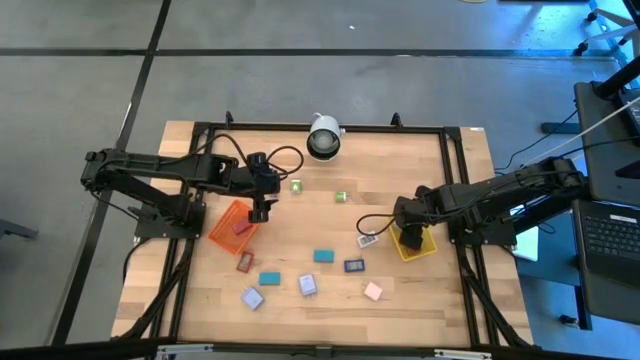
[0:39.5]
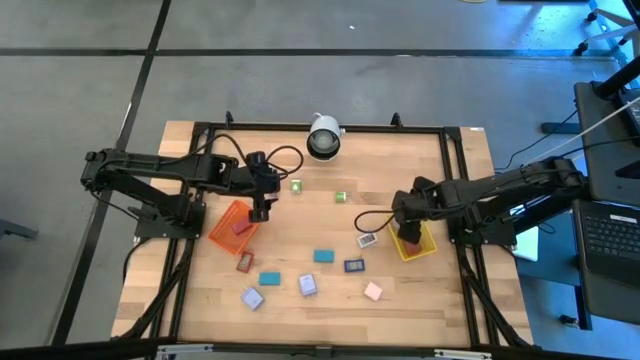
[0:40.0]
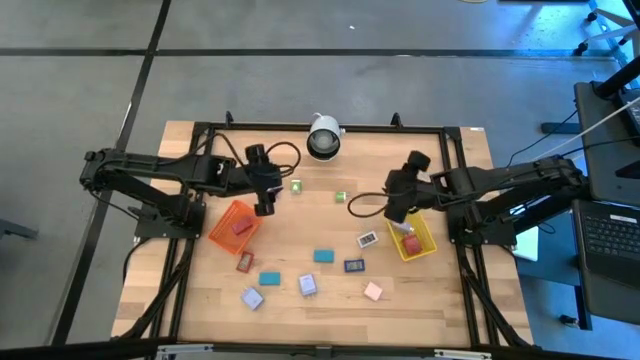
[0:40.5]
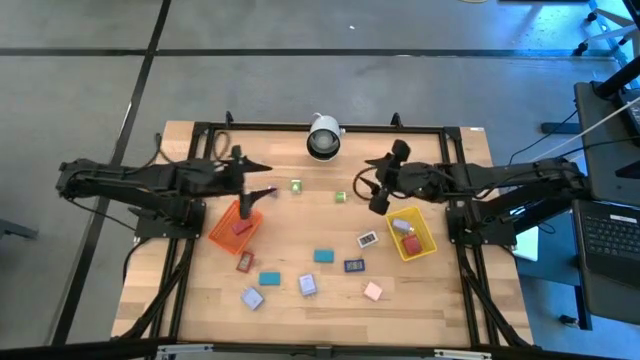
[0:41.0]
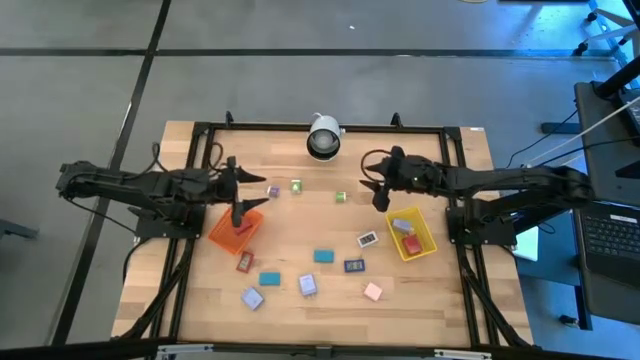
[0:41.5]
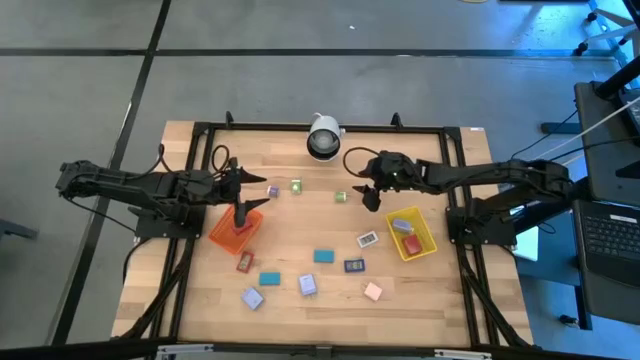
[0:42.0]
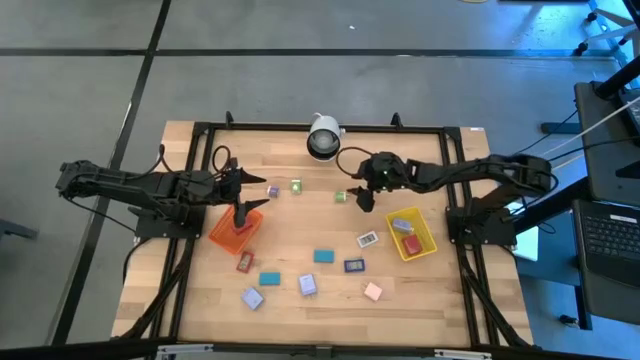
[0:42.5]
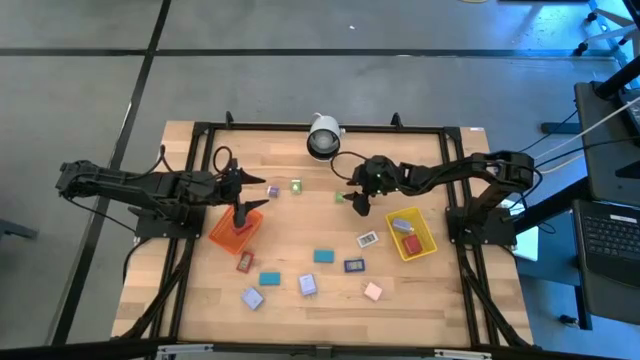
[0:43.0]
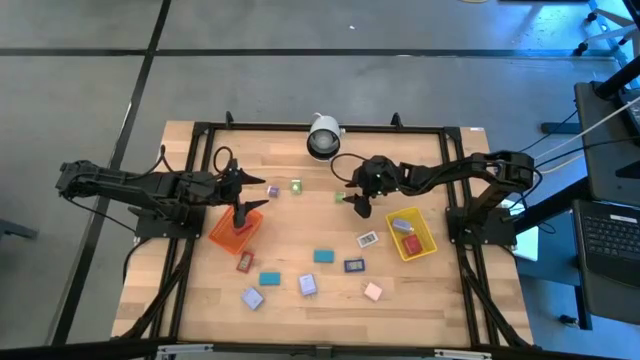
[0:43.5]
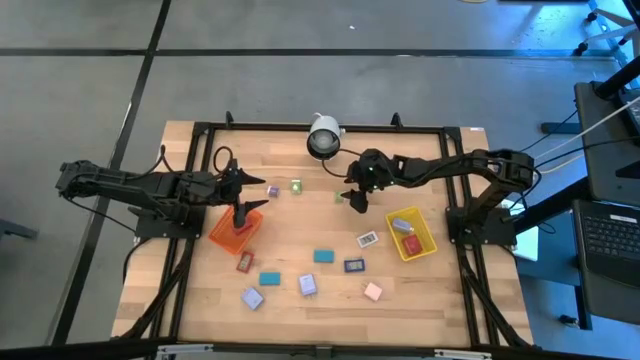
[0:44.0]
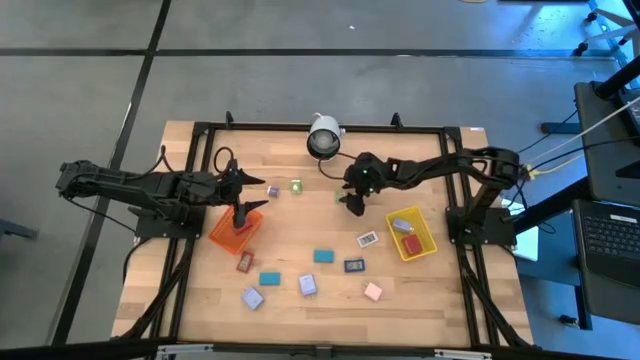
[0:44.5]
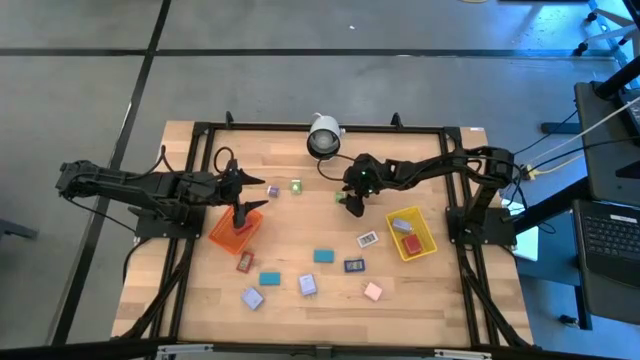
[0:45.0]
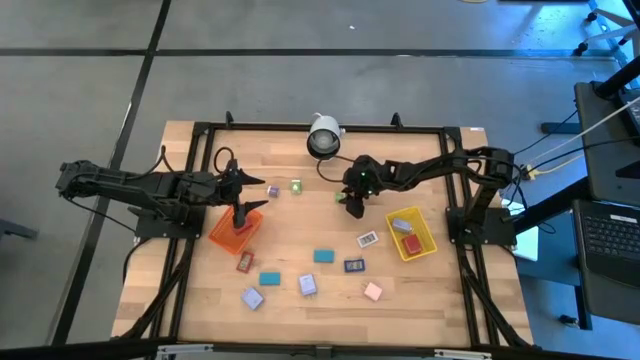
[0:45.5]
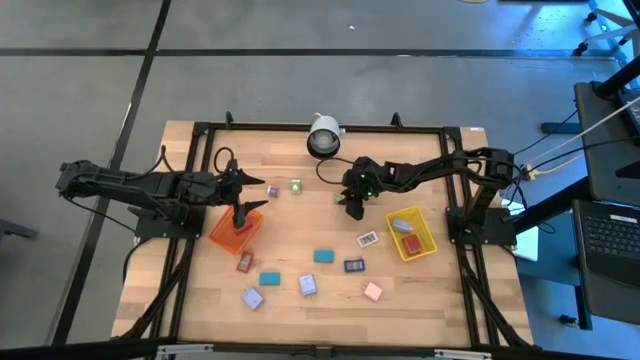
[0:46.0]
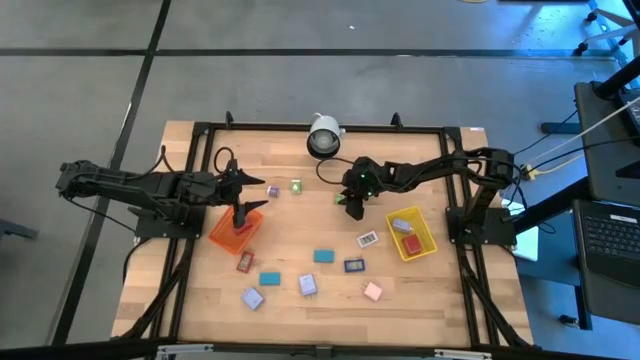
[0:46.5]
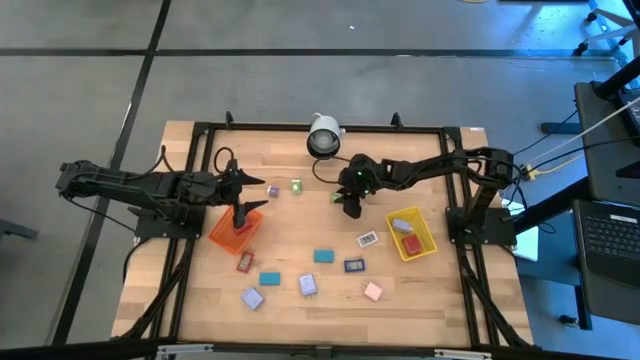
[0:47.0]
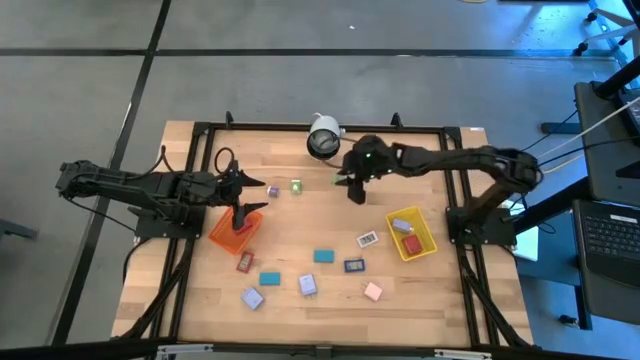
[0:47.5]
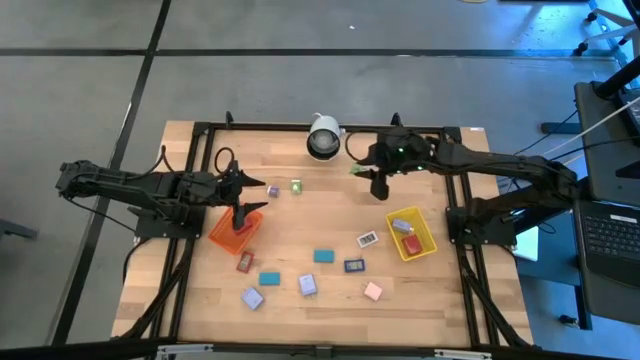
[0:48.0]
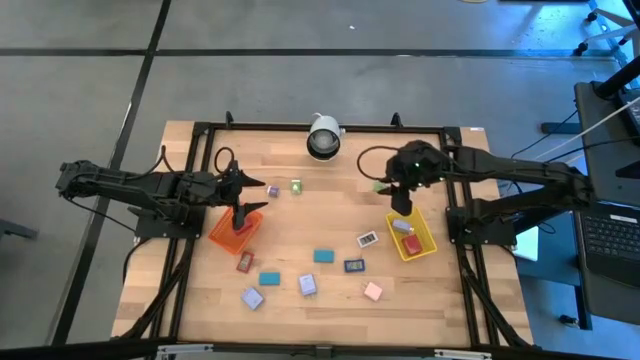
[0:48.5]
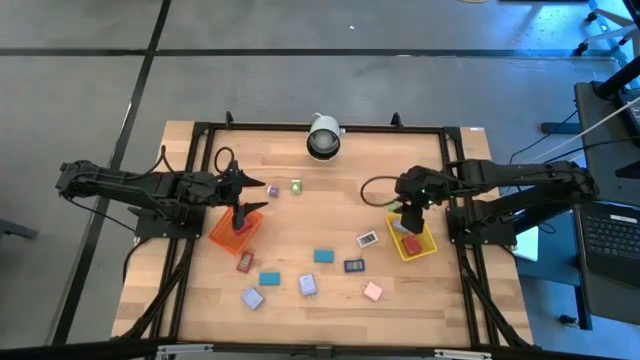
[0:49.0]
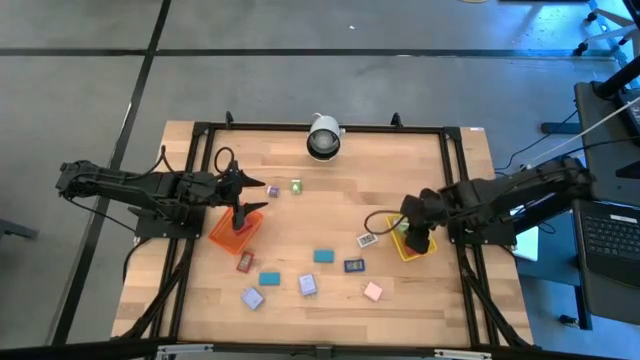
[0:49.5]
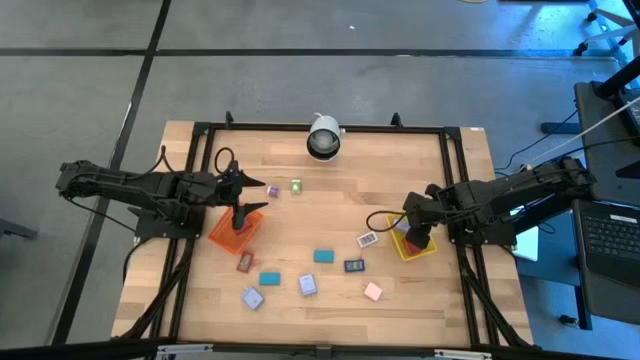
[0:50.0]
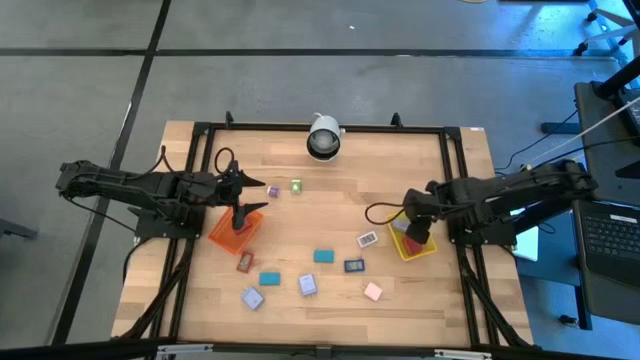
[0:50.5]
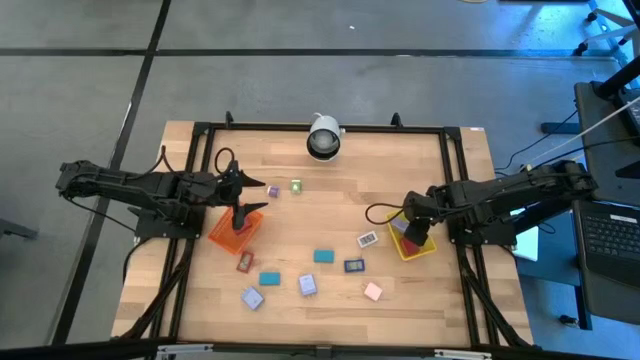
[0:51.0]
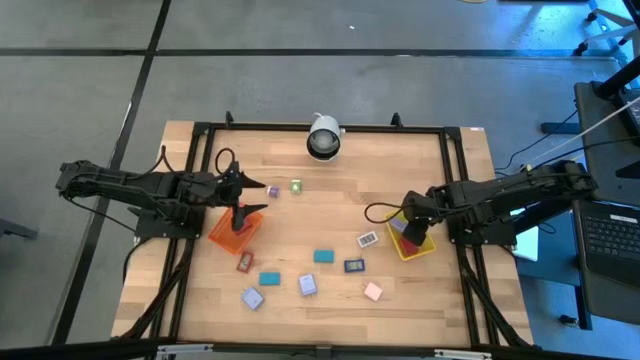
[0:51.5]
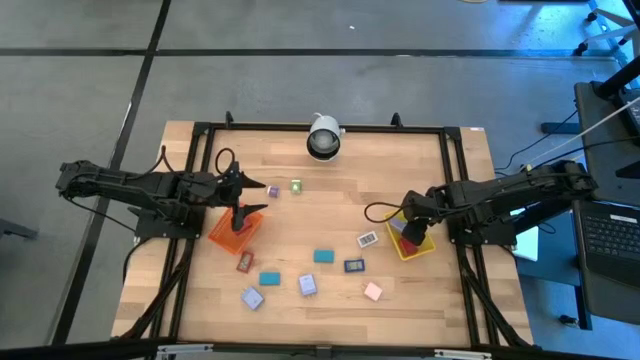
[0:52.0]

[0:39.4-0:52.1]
Task: Pick & Place Office items
Put the right green charger adapter into the yellow basket

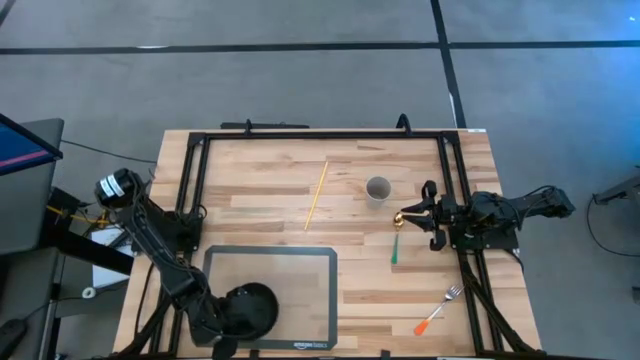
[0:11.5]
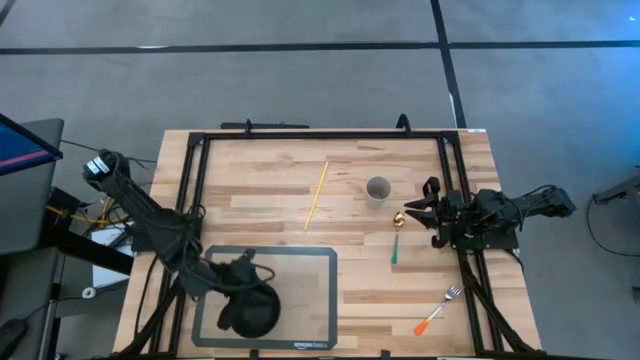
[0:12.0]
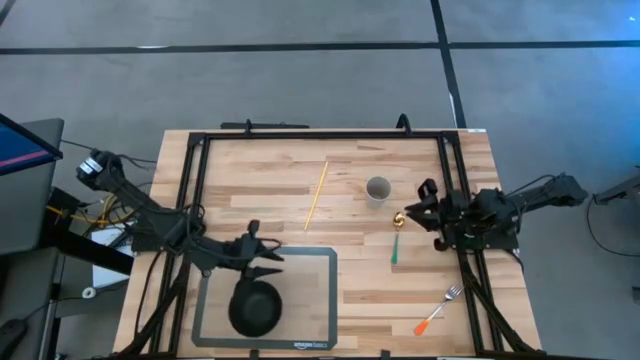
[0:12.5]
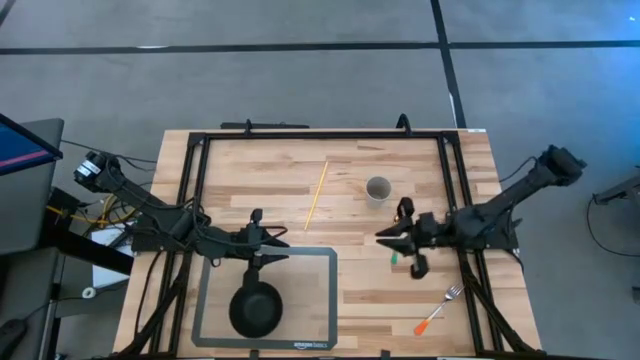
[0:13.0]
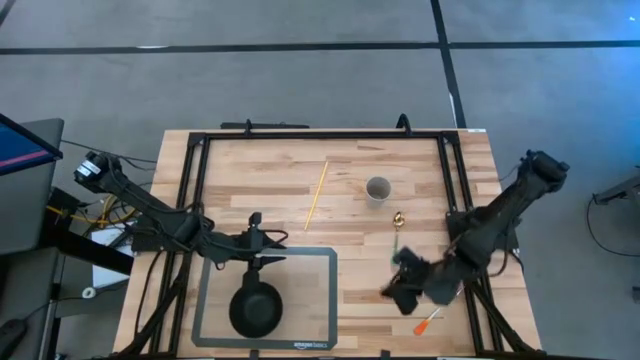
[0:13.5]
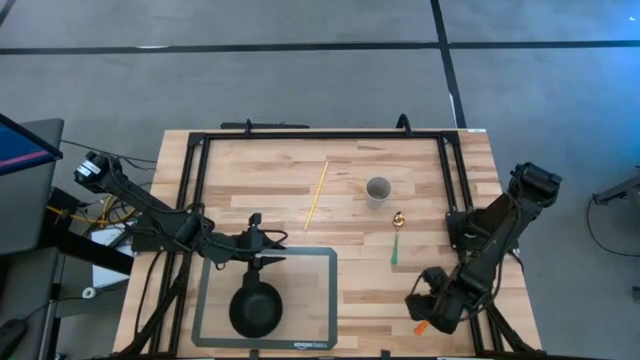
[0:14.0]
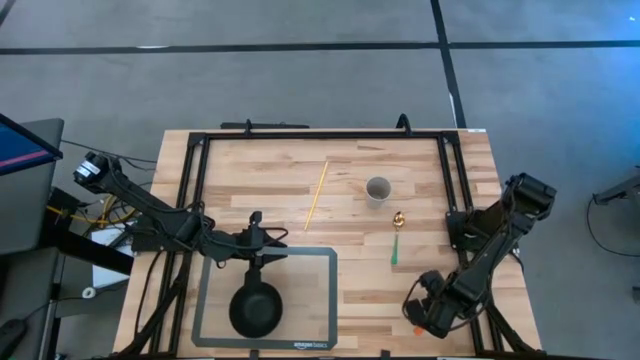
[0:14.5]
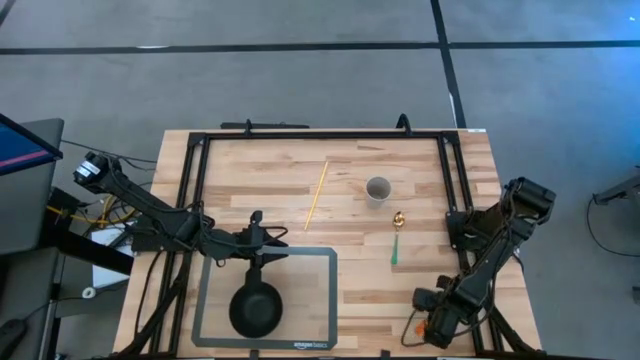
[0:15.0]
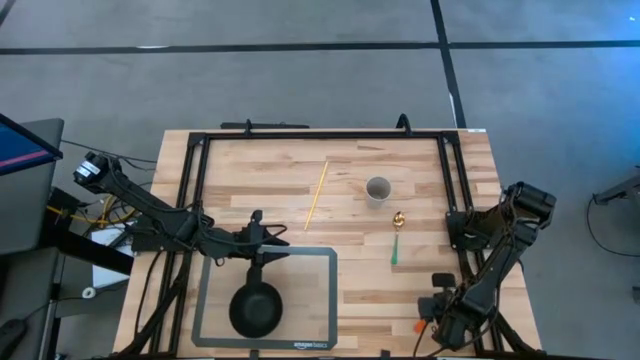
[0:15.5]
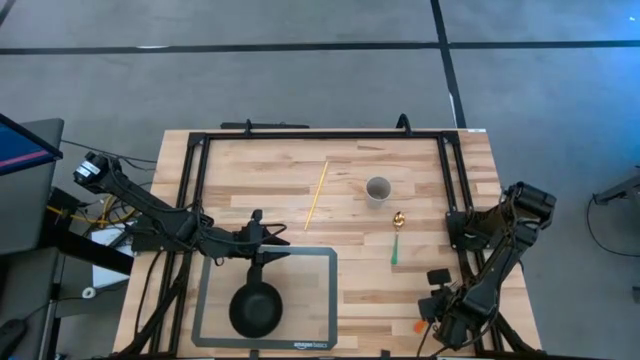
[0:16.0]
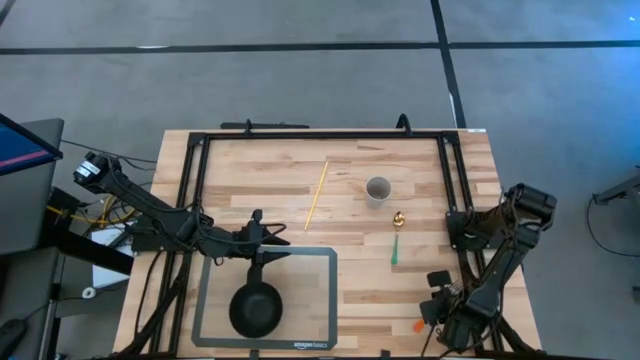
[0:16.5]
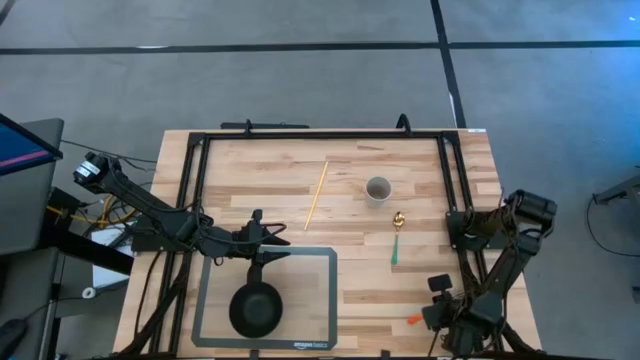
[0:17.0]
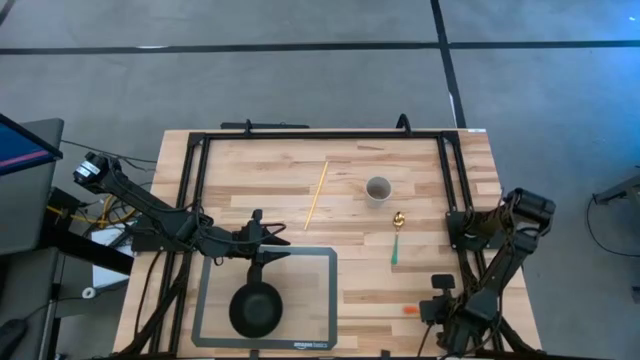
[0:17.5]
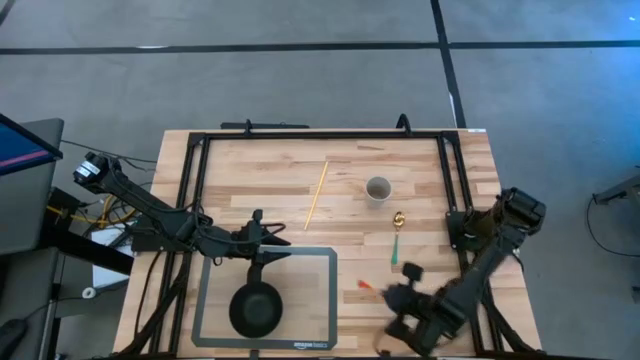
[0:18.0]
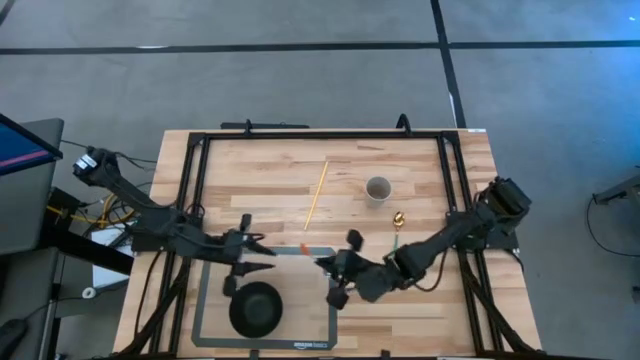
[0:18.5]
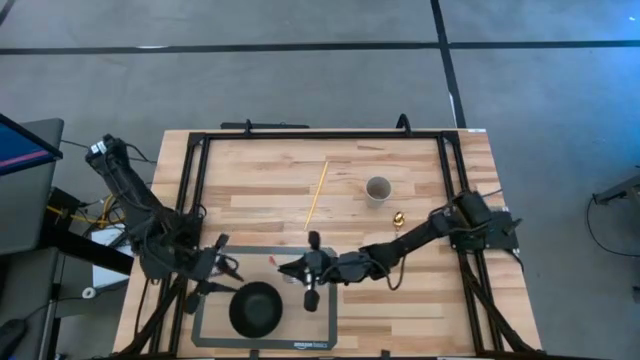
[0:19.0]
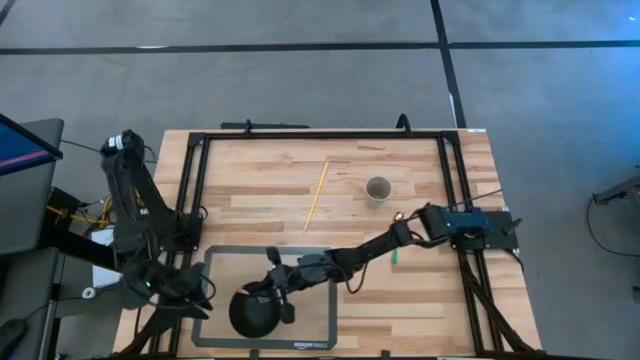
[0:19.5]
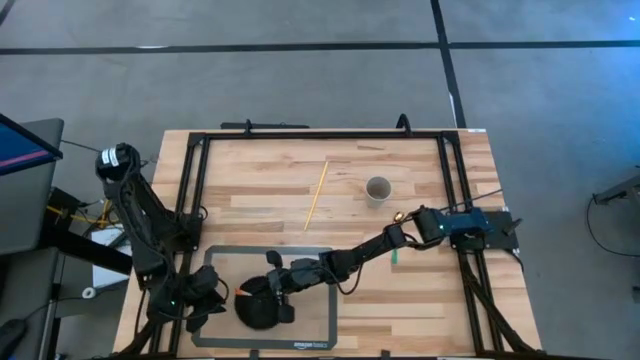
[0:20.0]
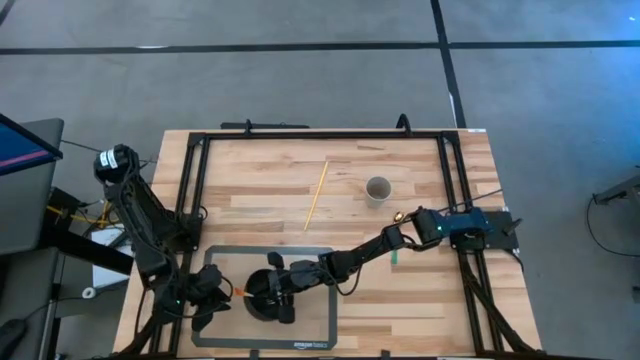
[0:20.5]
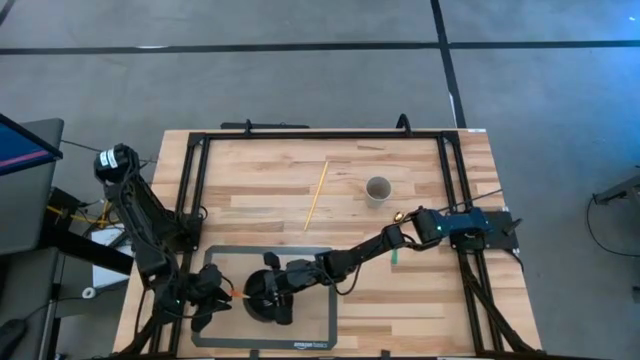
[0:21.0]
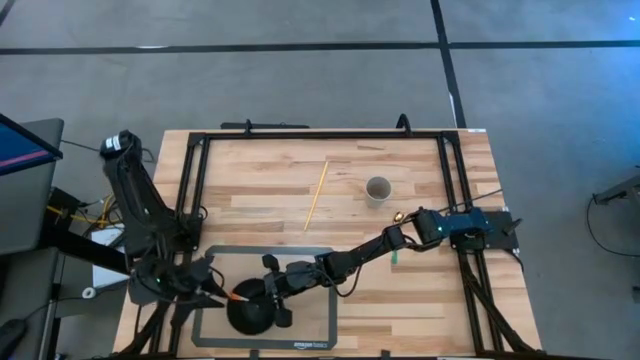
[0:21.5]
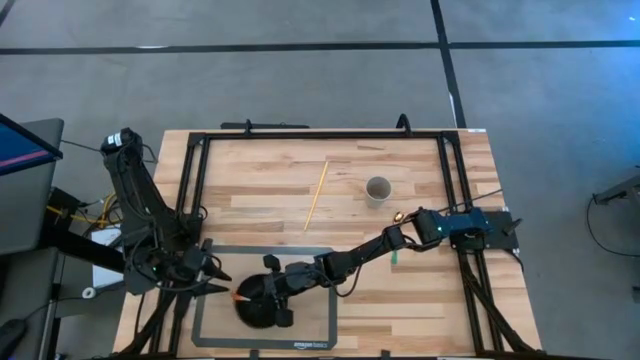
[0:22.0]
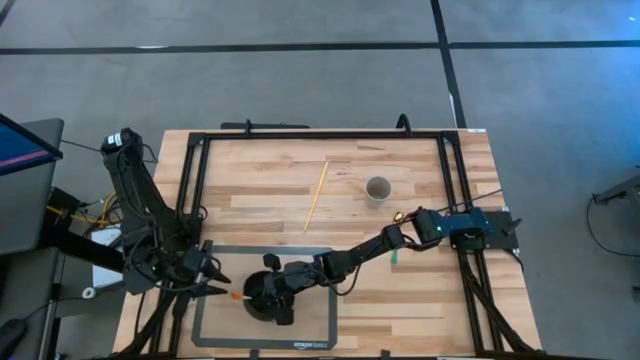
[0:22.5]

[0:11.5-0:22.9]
Task: Pick & Place Utensil
Put the orange fork into the black bowl on the transparent mat
